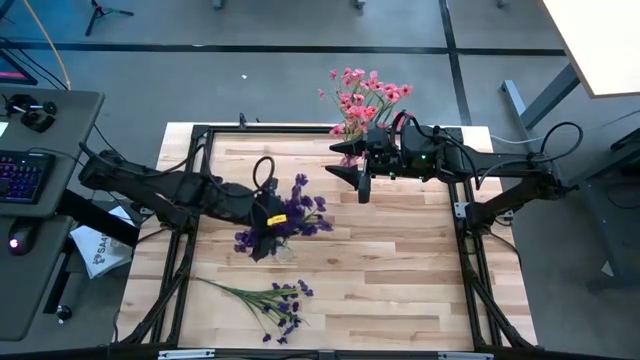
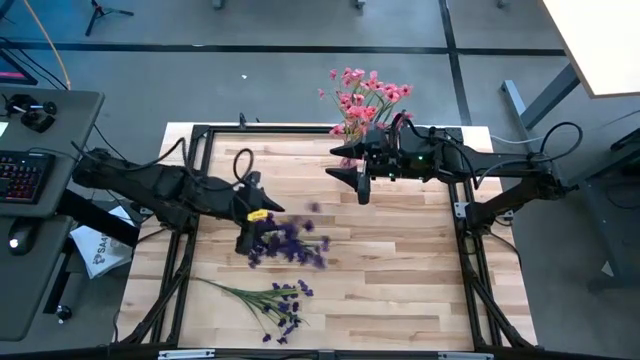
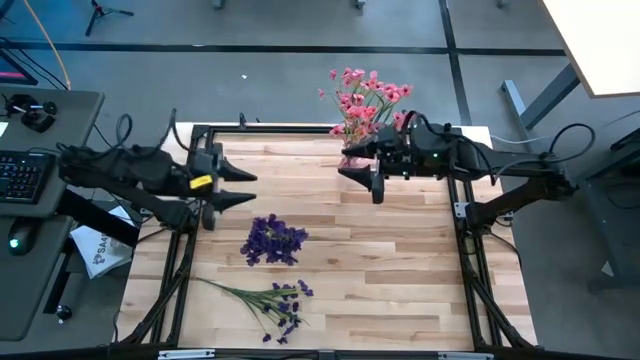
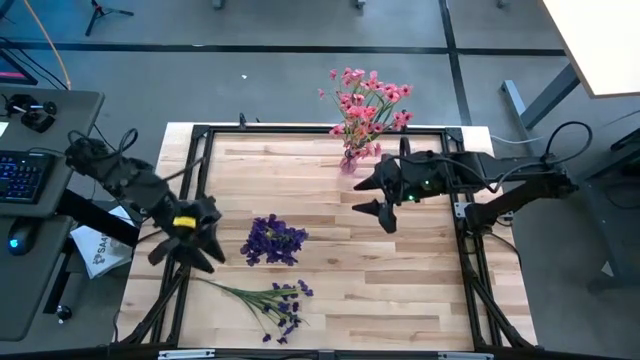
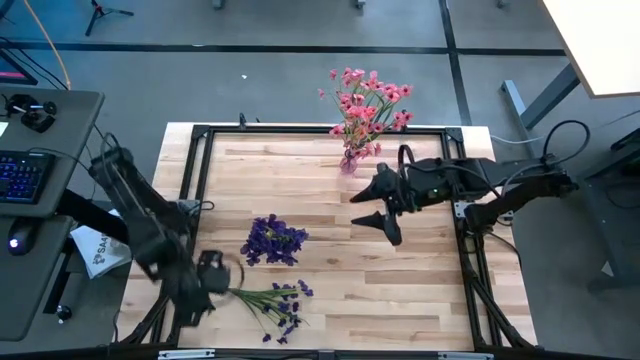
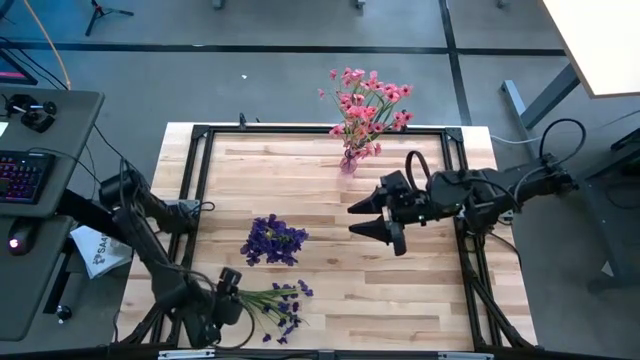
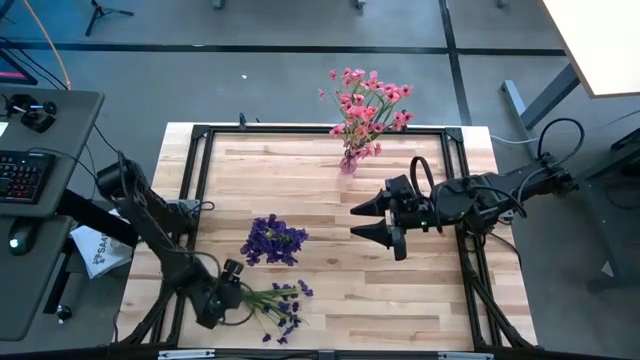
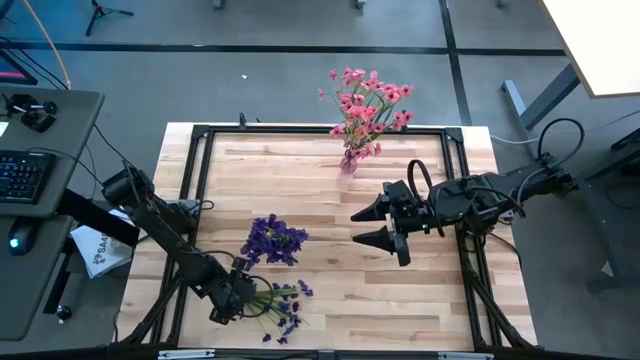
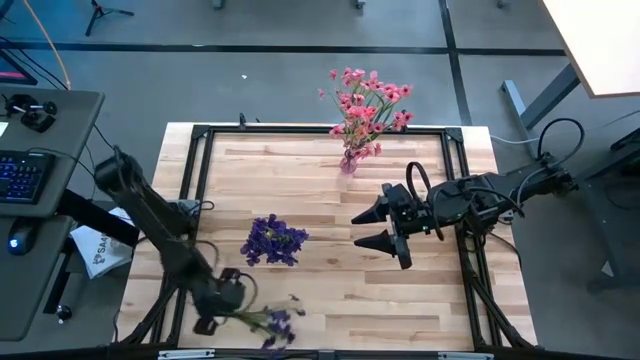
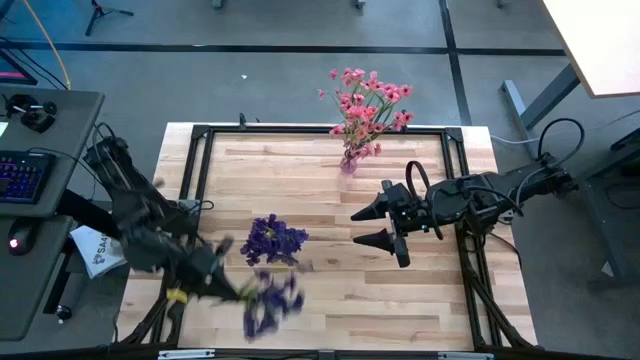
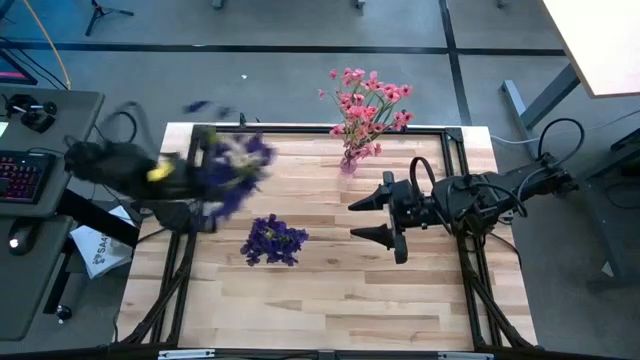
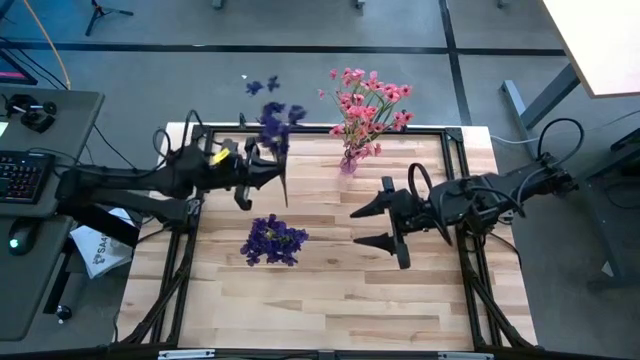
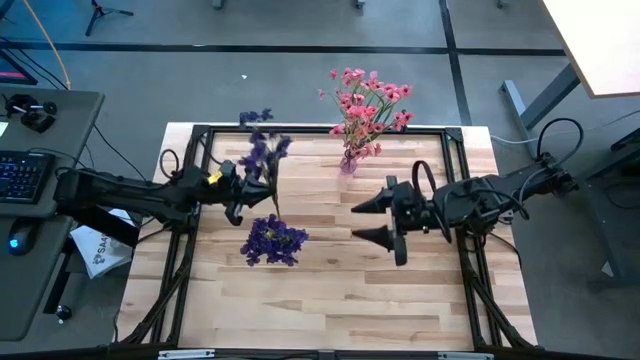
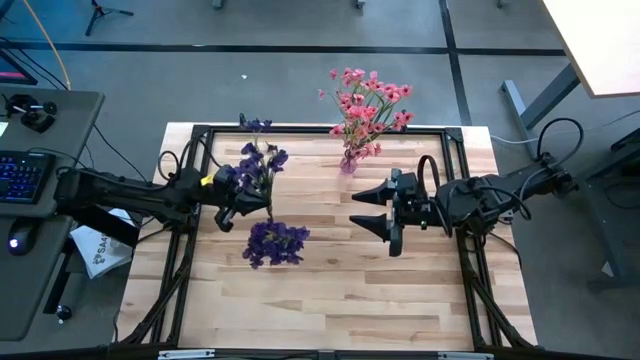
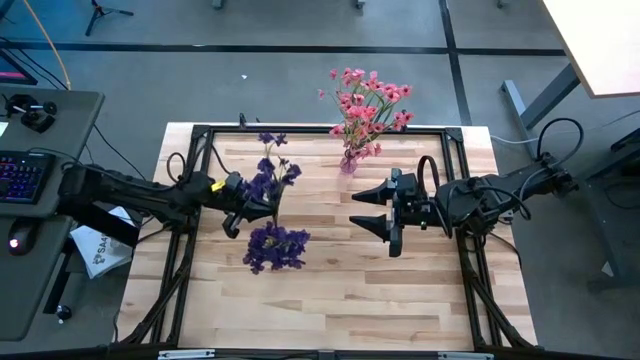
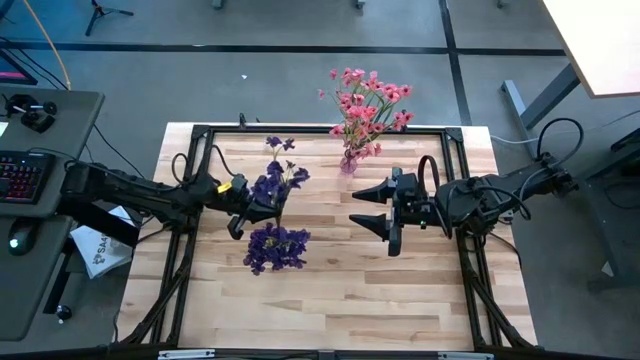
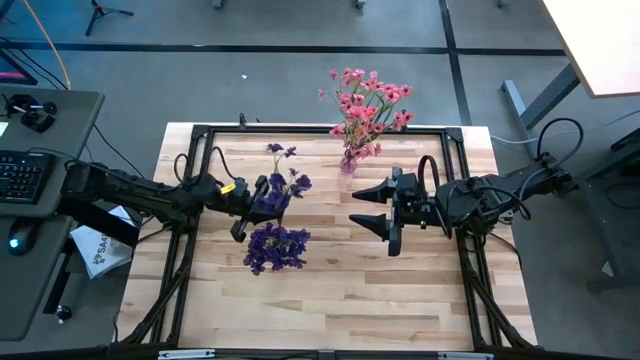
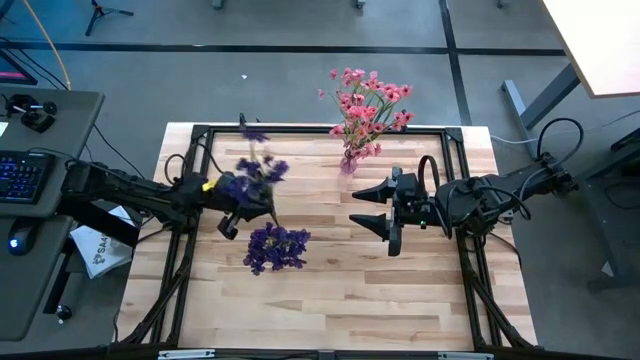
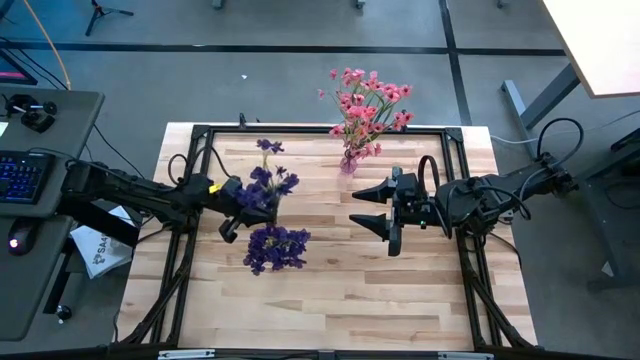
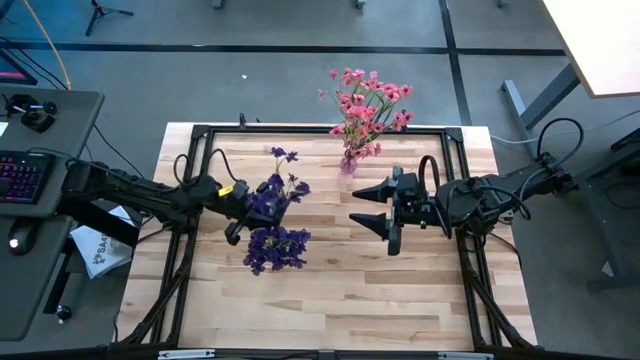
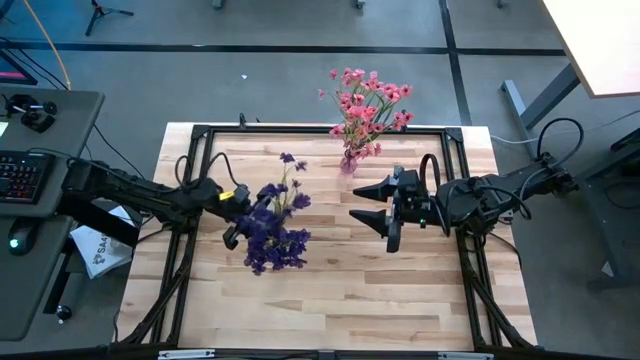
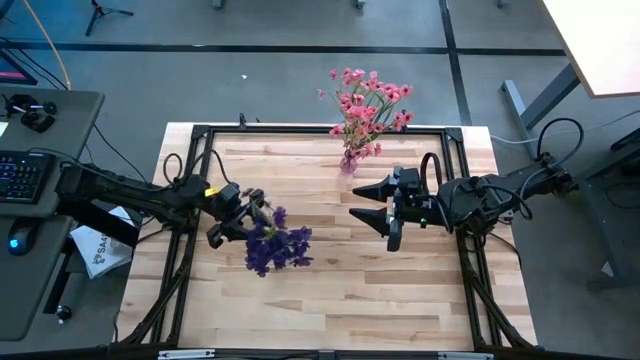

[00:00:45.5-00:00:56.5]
Task: Sort flowers into vase by color
Put the purple flowers into the transparent vase

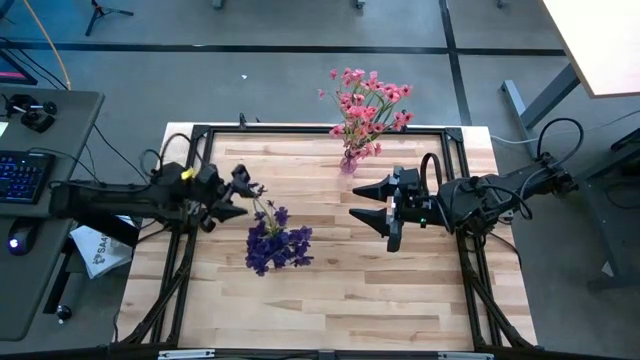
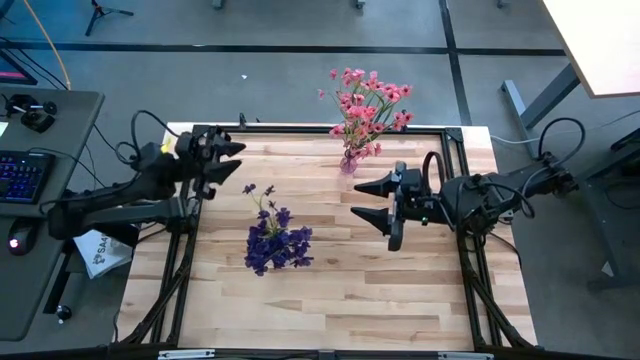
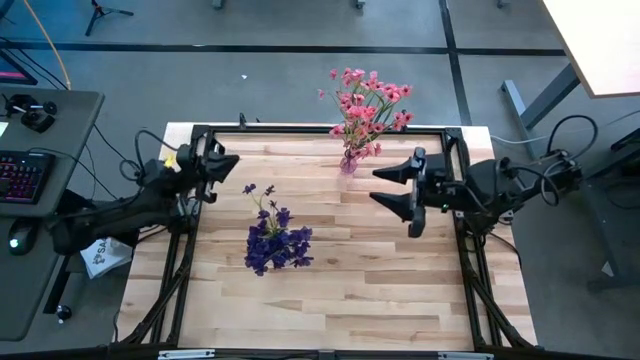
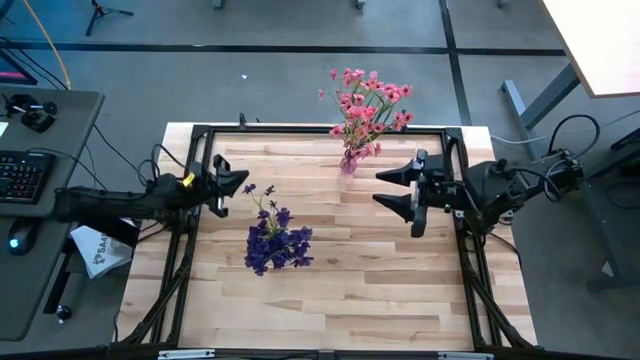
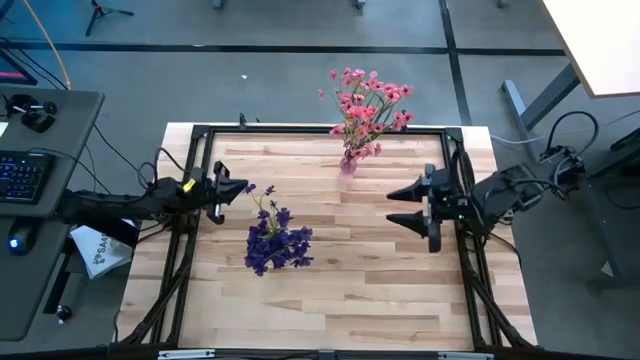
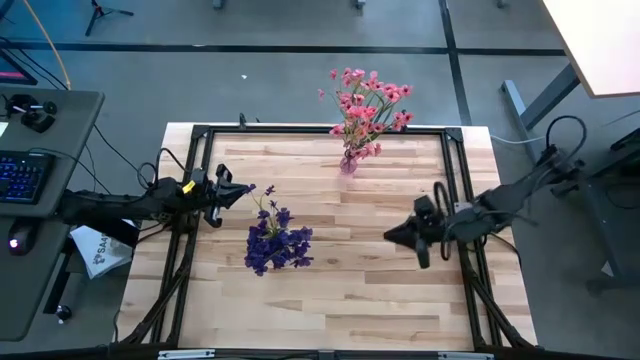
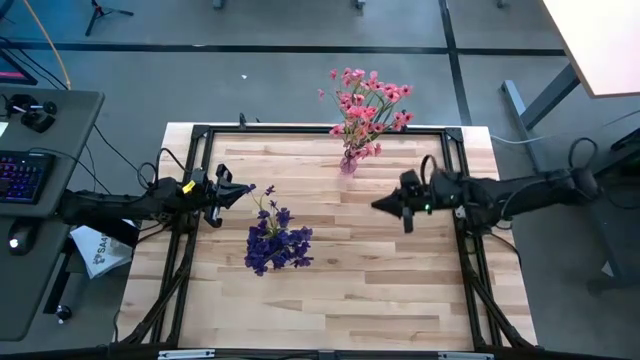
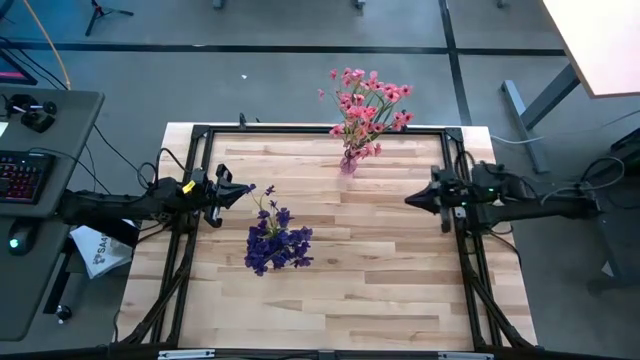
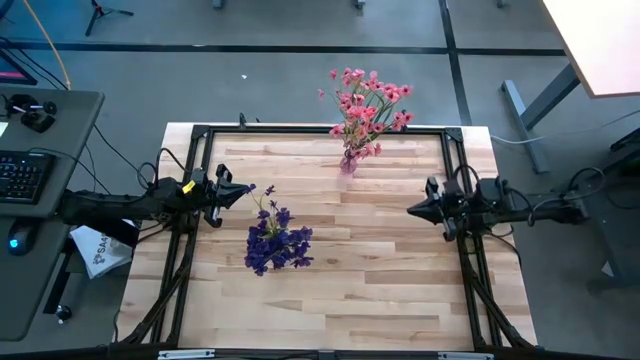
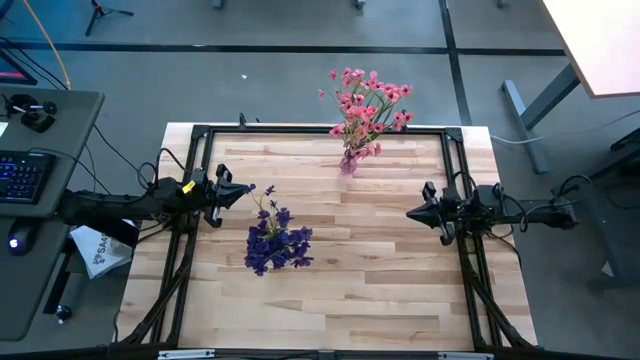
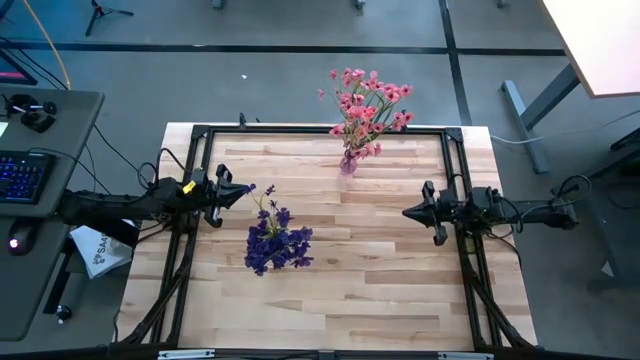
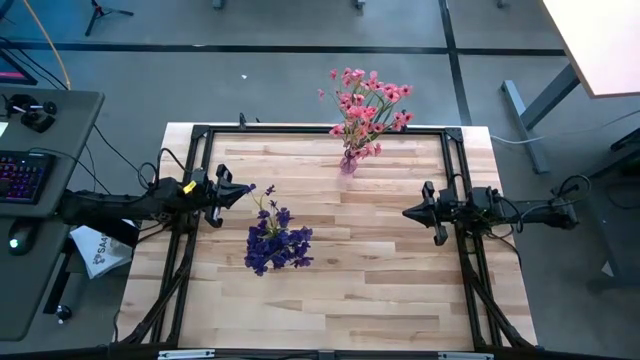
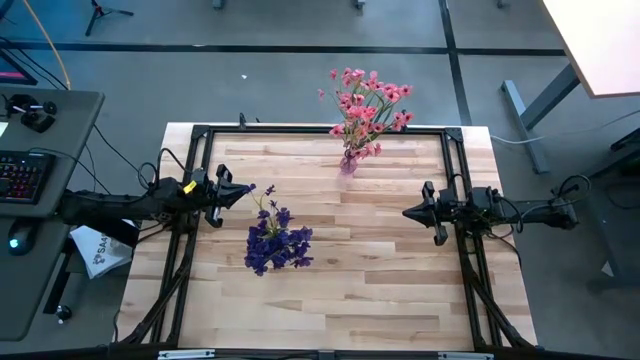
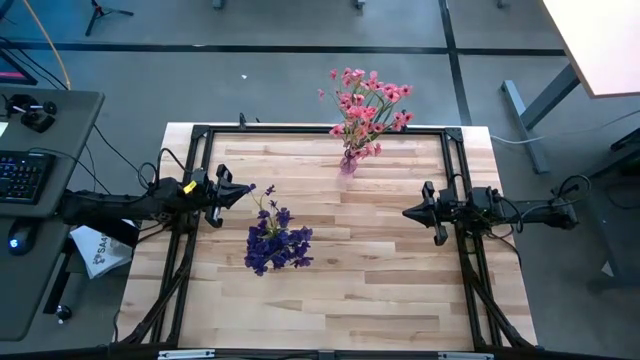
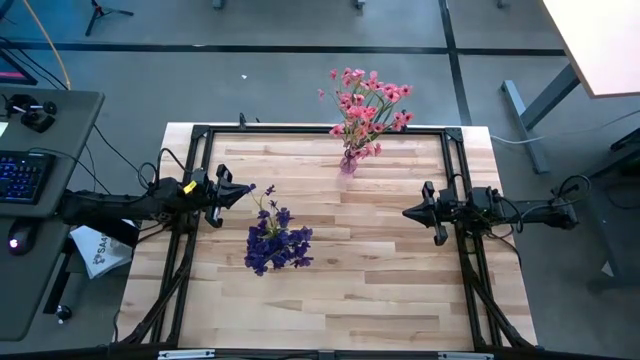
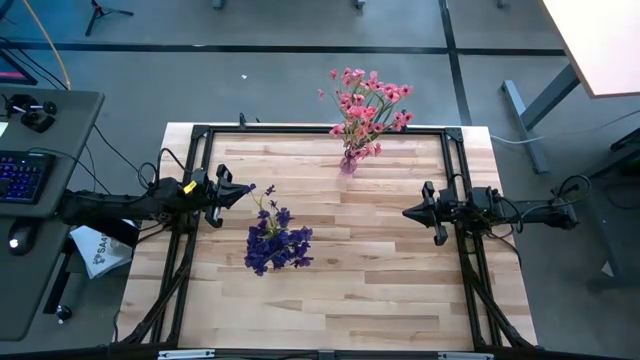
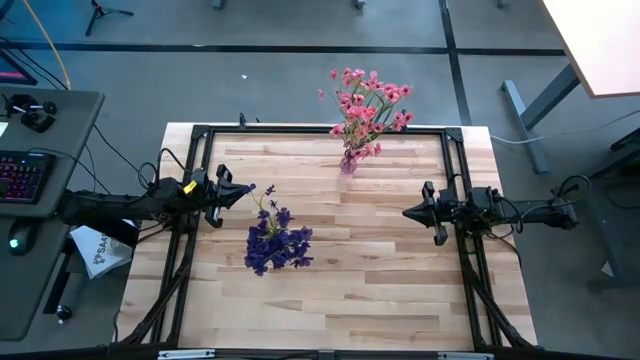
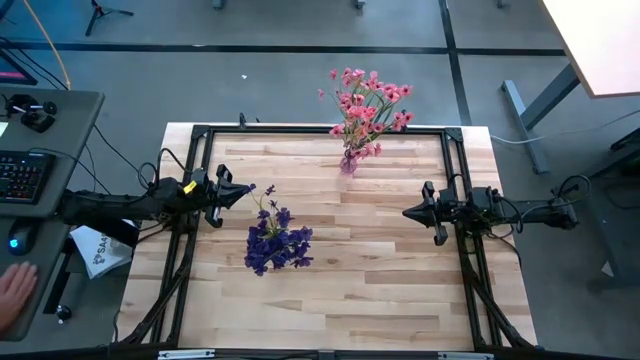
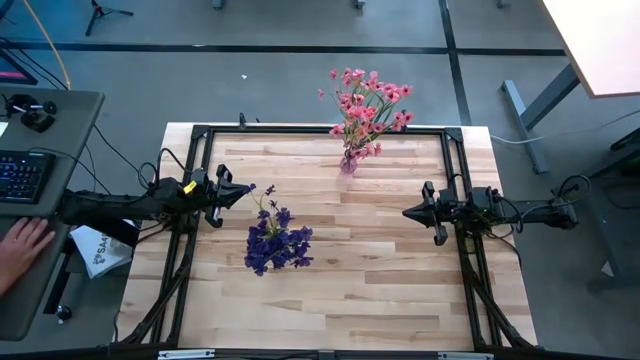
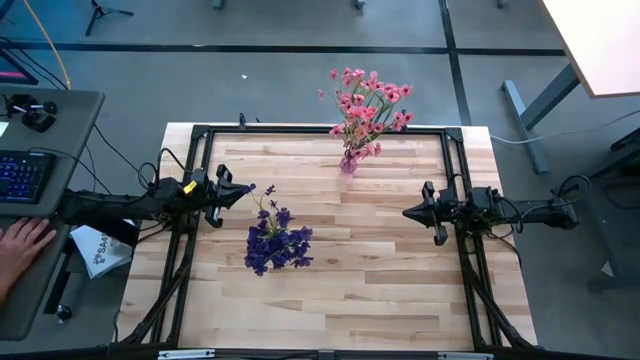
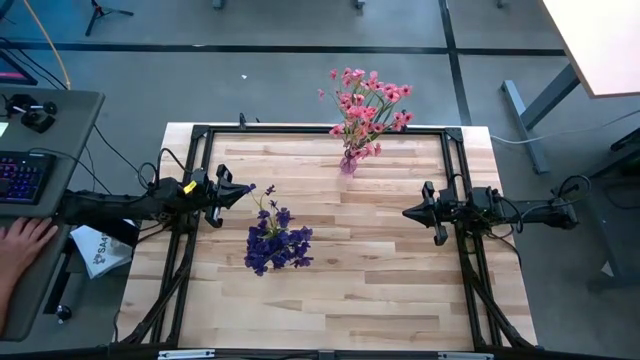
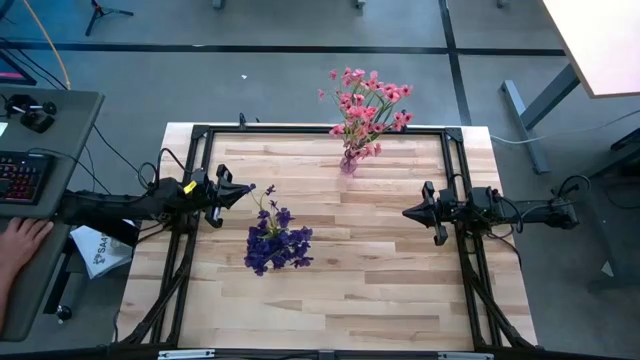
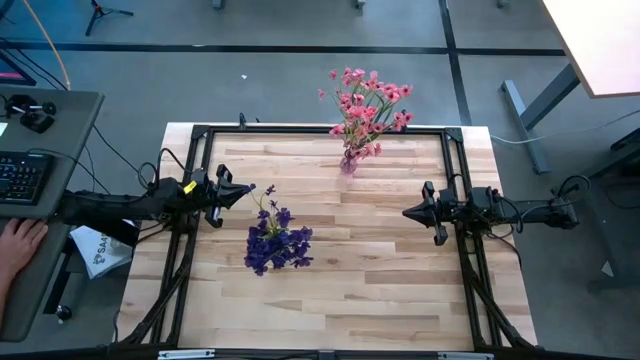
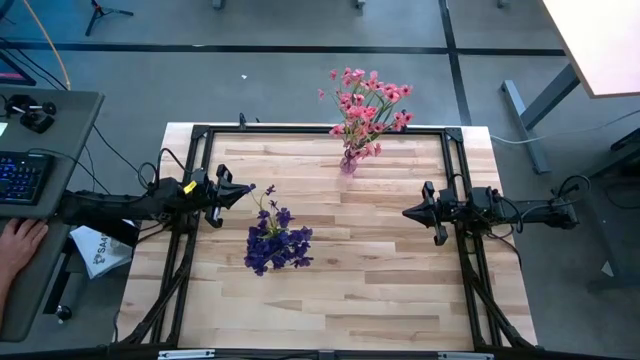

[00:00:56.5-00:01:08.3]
Return to Home Position
